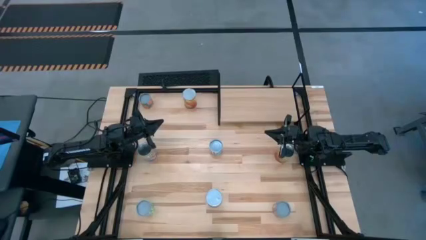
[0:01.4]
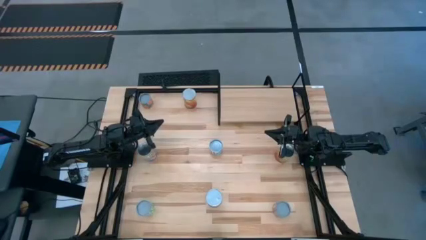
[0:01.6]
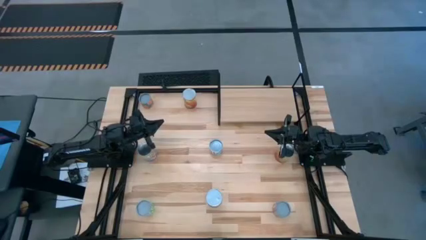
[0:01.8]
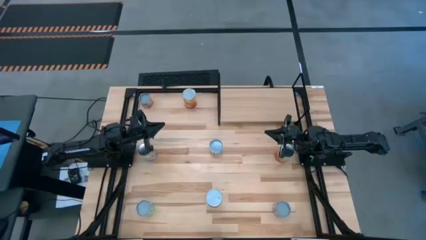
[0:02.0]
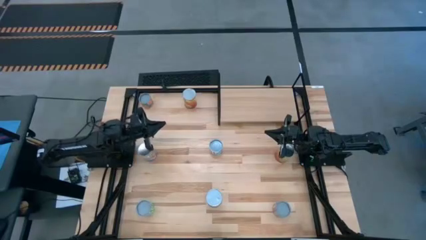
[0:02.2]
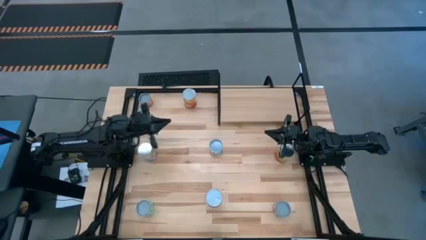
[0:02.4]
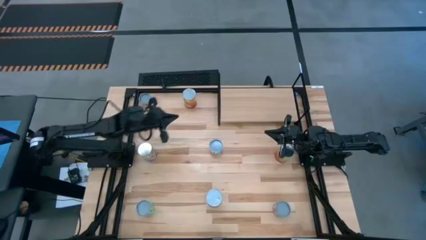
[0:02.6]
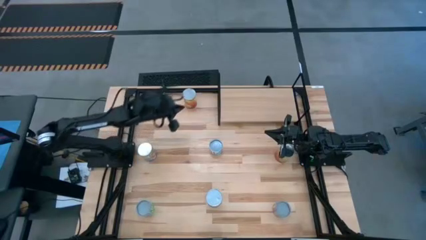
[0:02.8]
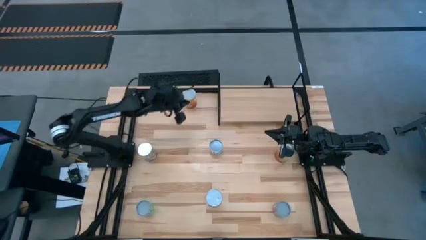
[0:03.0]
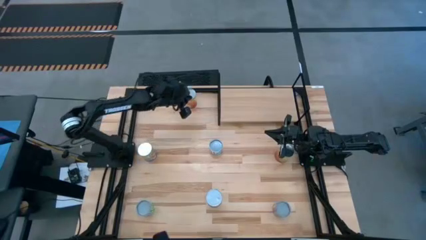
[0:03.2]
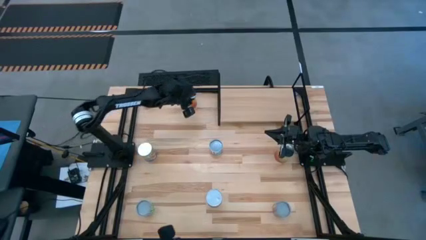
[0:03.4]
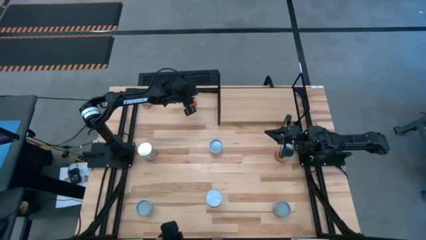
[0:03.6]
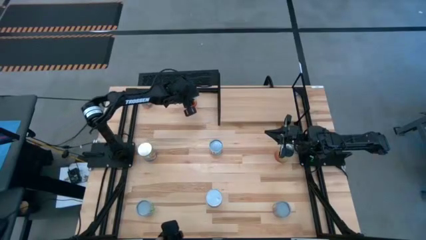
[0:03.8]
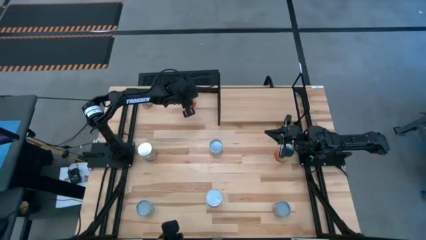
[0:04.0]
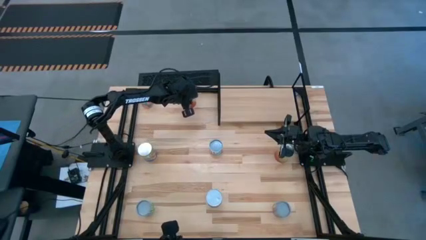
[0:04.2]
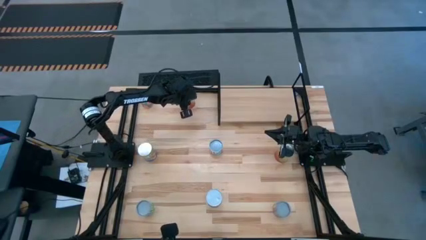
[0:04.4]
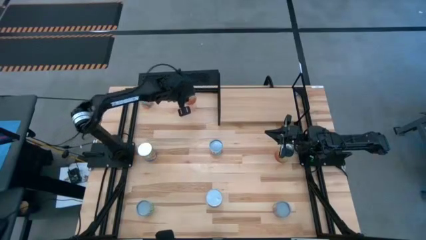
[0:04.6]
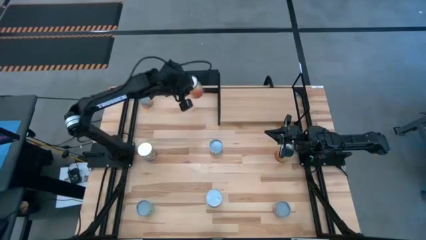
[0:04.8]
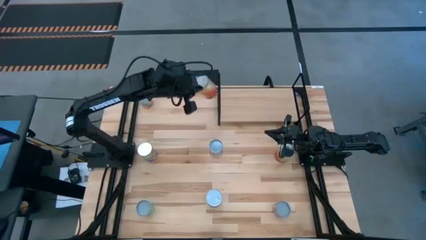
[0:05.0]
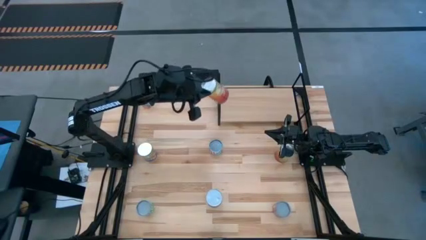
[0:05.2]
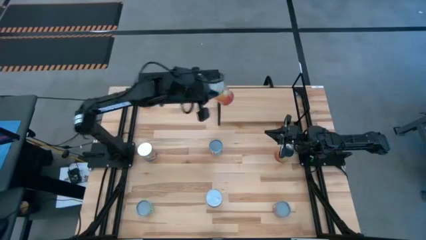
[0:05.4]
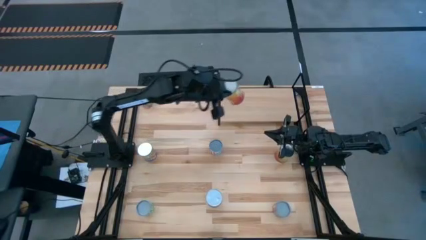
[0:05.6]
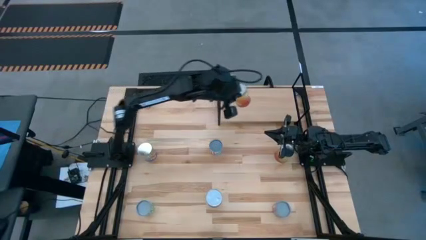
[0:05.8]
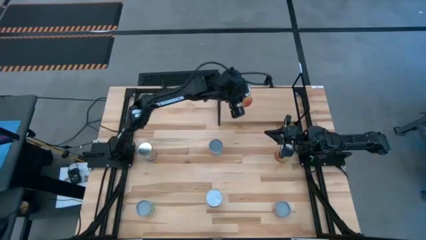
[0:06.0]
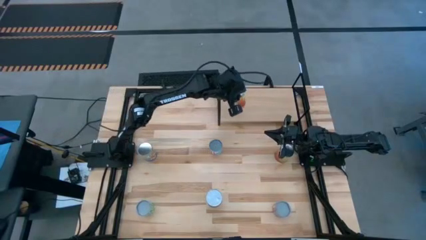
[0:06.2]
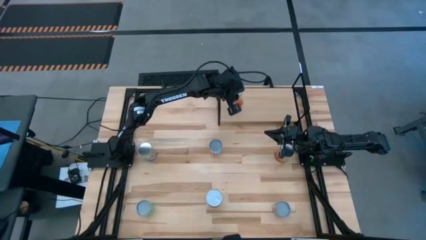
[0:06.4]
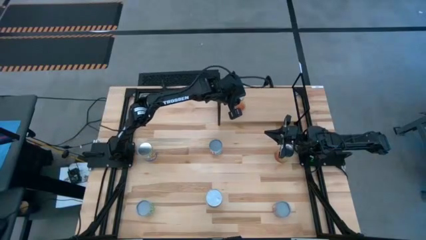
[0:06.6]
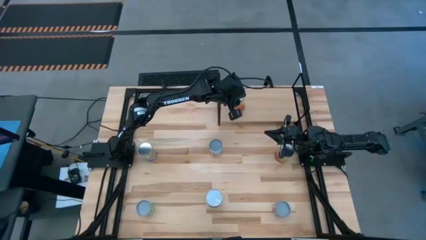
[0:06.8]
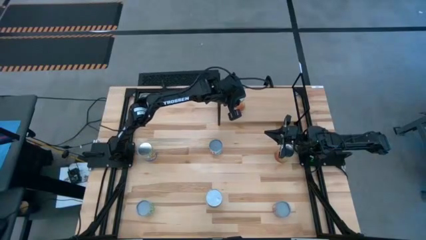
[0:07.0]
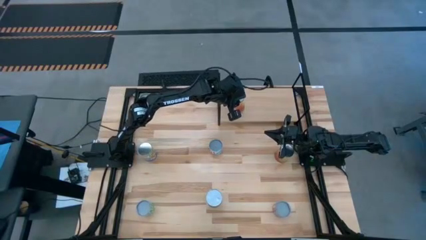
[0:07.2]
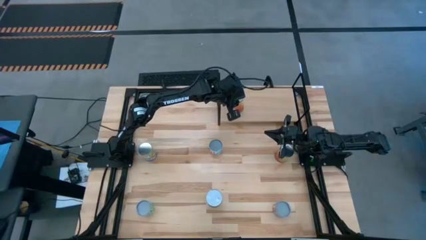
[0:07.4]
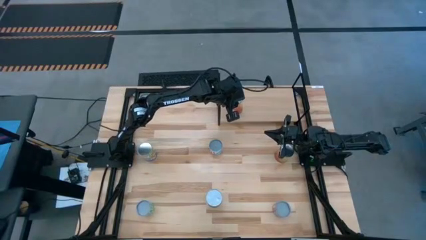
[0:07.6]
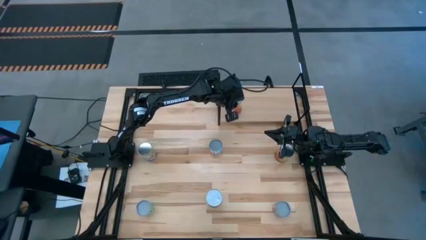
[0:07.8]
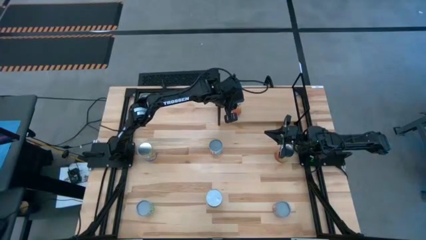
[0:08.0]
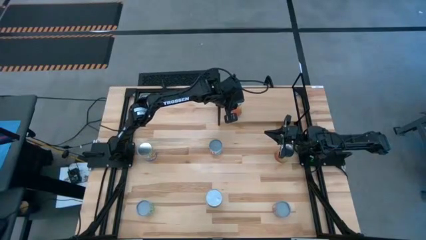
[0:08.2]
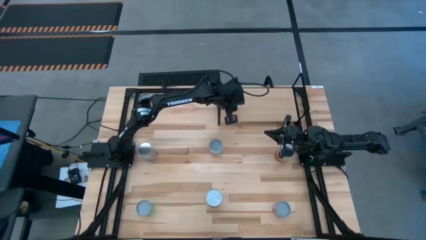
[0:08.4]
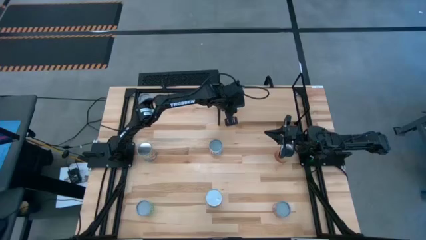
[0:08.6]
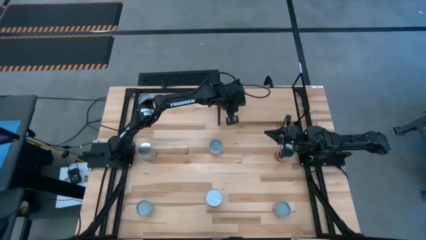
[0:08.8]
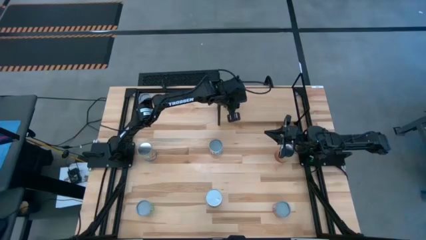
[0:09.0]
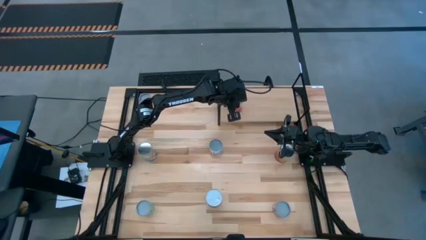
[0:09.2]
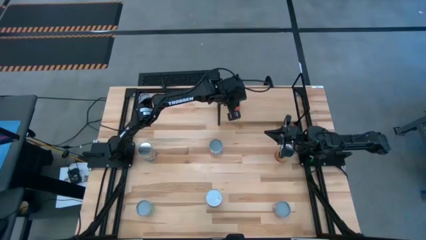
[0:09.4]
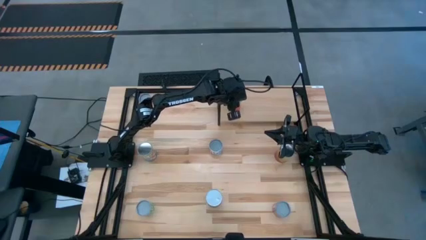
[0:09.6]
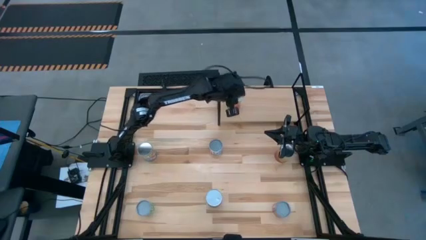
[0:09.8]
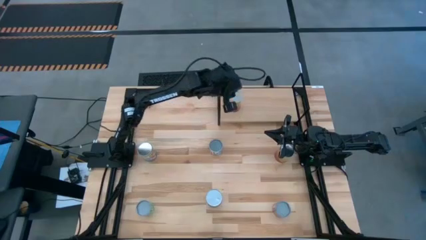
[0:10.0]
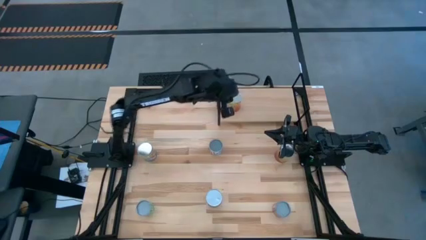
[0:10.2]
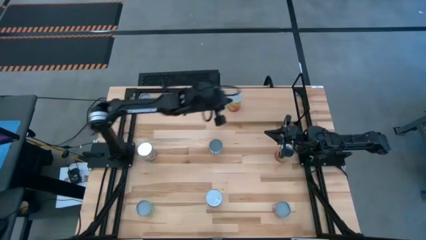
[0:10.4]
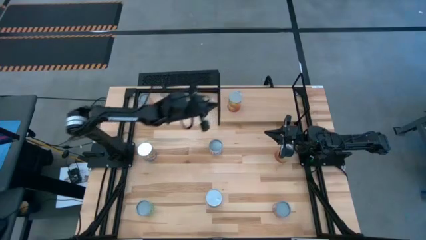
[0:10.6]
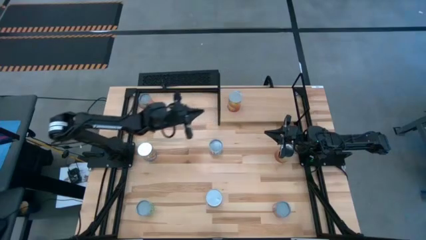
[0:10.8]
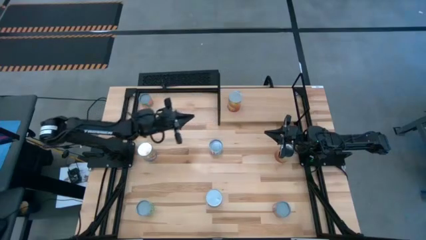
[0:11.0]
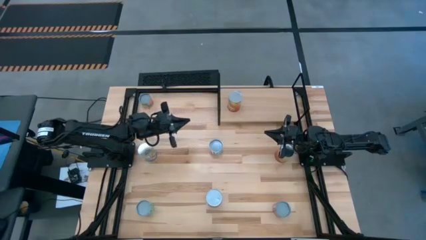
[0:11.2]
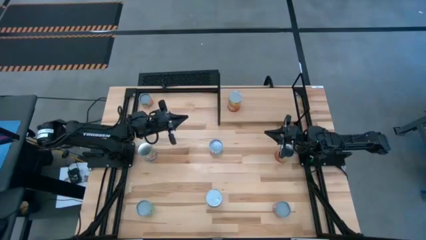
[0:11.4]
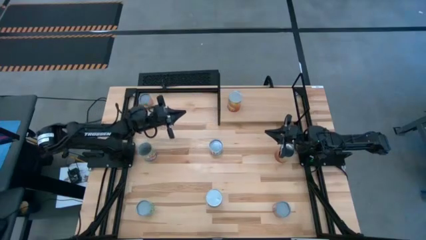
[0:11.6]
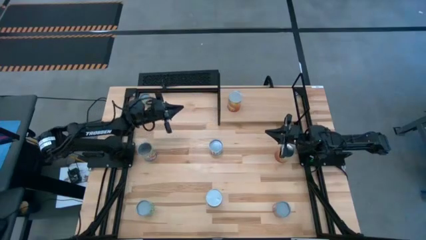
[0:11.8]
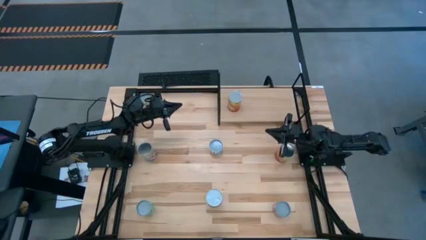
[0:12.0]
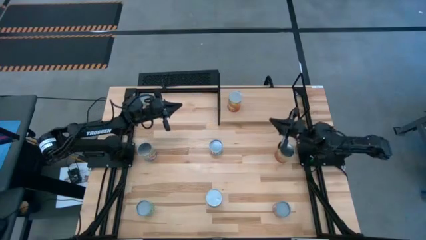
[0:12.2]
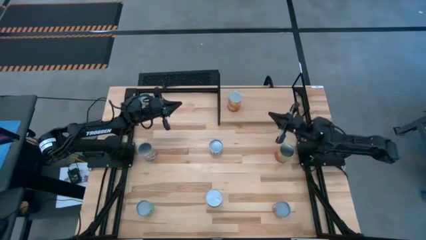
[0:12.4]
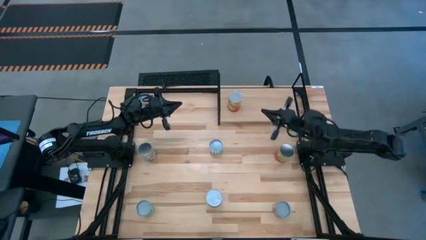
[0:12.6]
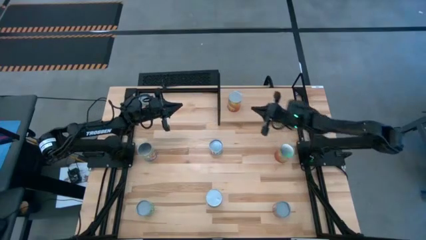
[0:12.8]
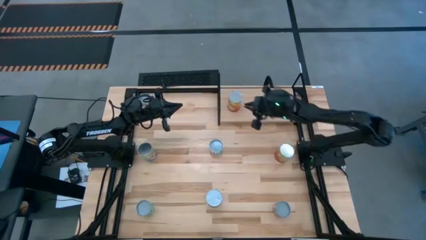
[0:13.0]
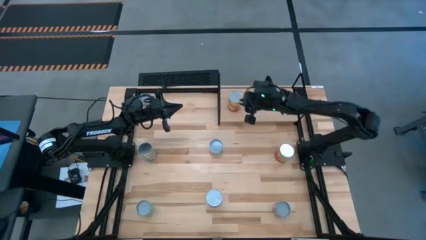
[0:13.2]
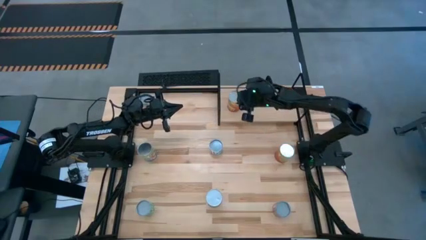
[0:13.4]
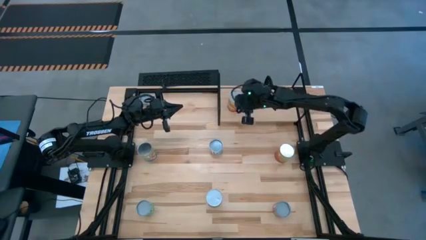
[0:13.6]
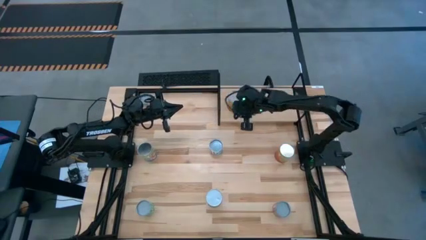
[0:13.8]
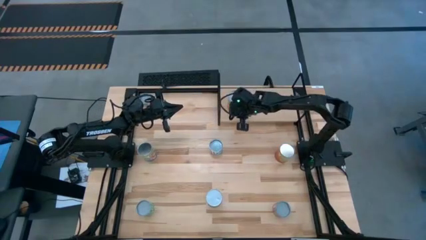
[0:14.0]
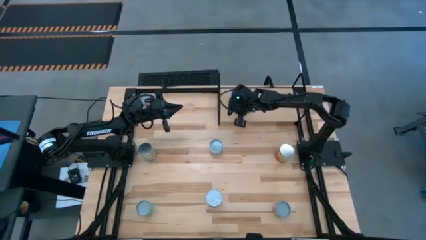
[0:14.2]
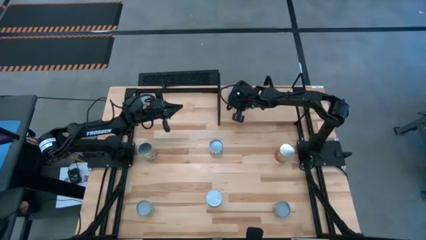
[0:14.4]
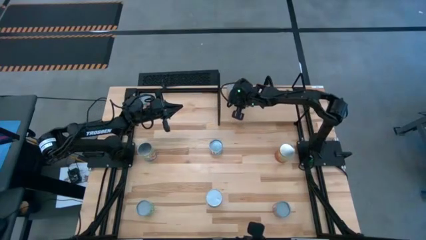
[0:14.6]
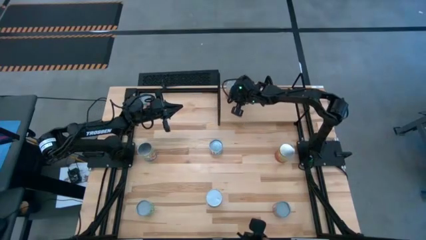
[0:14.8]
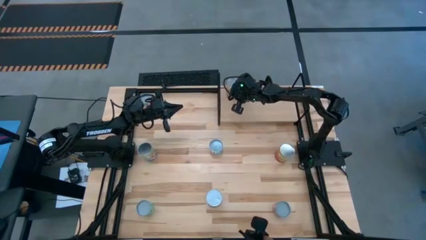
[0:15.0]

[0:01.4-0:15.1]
Task: Pick and place cans onto a shelf
Put the left red can on the shelf
